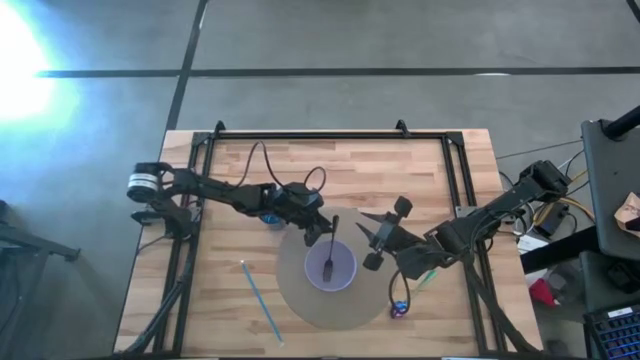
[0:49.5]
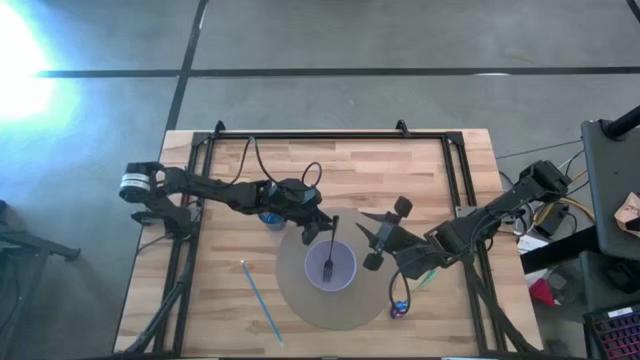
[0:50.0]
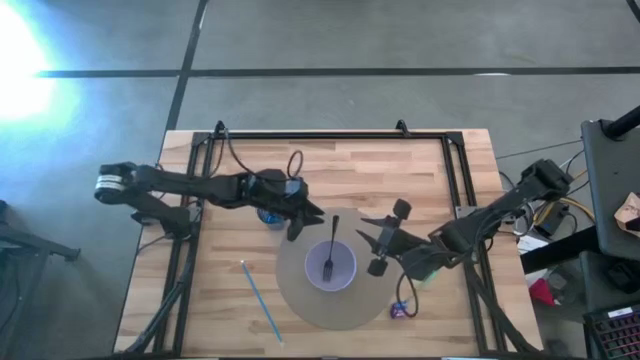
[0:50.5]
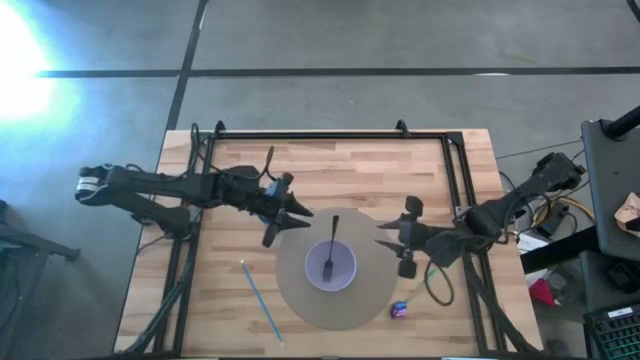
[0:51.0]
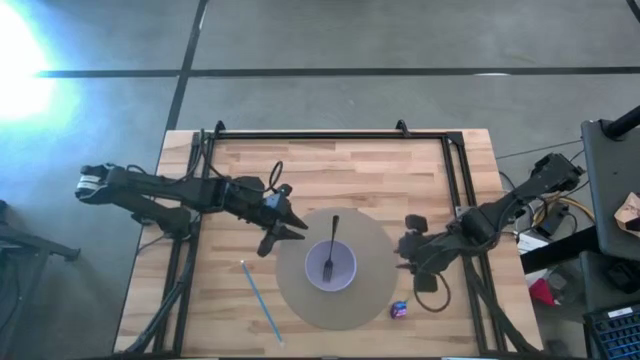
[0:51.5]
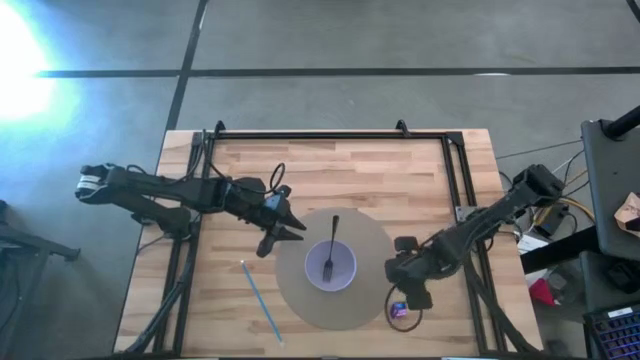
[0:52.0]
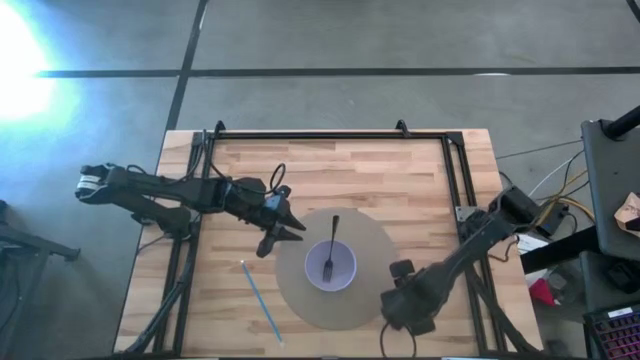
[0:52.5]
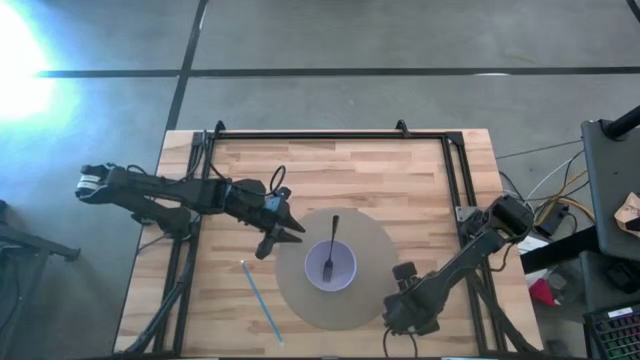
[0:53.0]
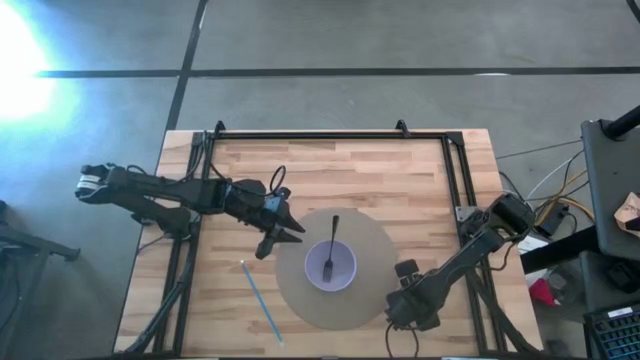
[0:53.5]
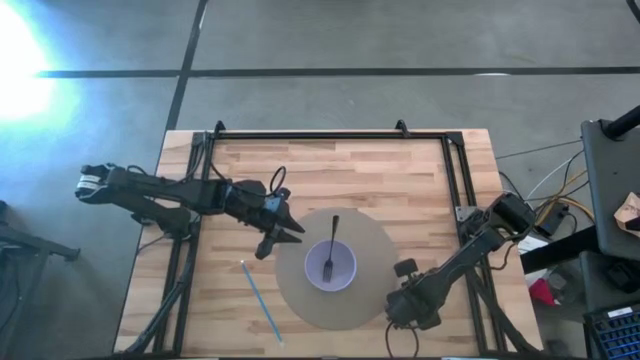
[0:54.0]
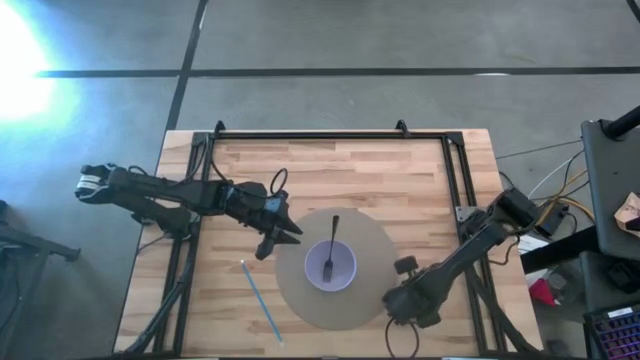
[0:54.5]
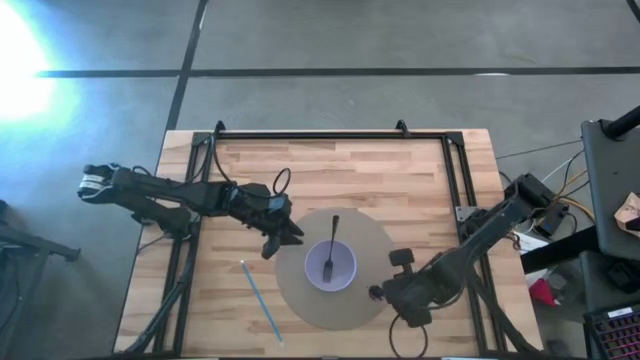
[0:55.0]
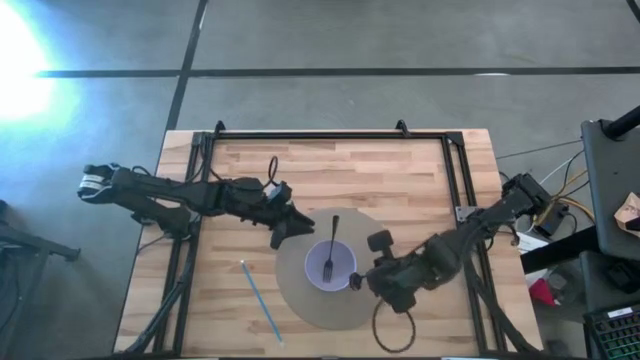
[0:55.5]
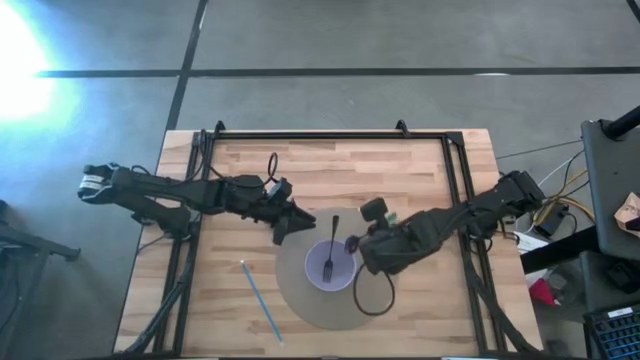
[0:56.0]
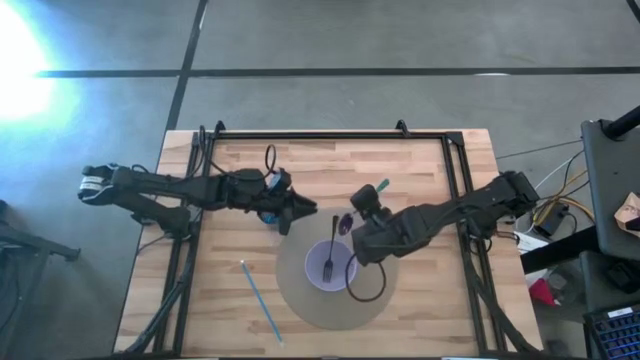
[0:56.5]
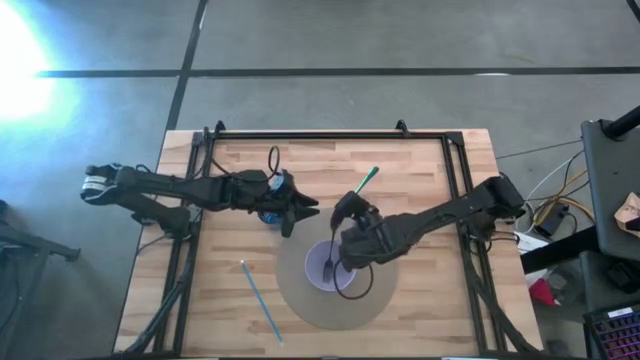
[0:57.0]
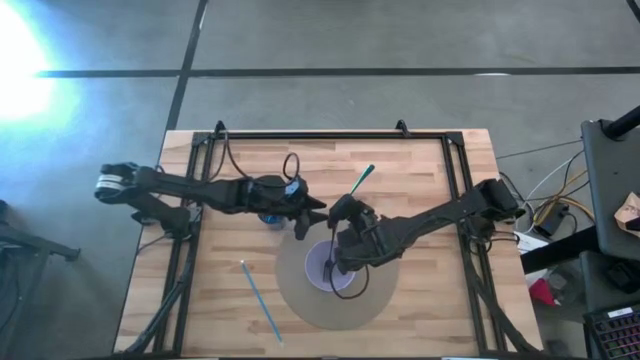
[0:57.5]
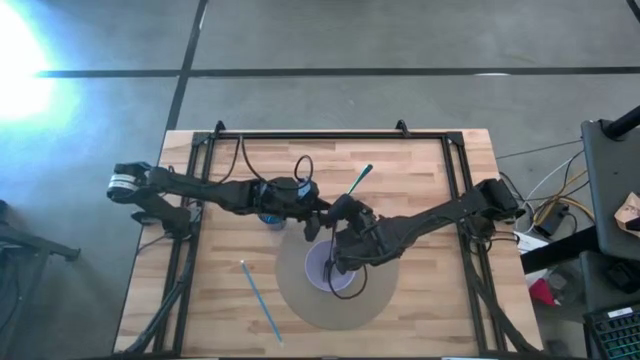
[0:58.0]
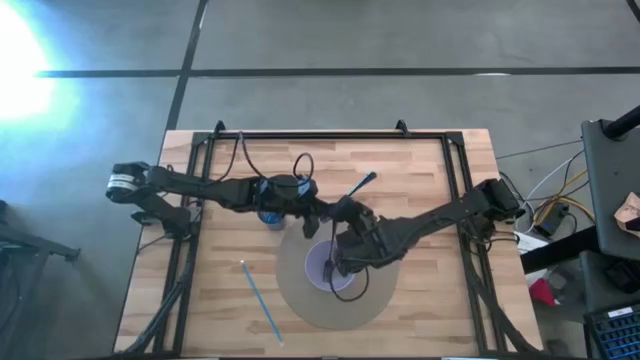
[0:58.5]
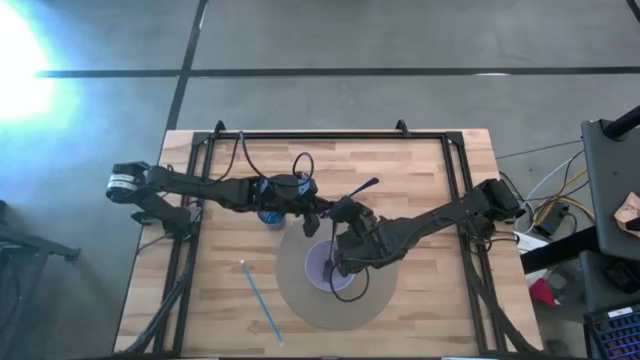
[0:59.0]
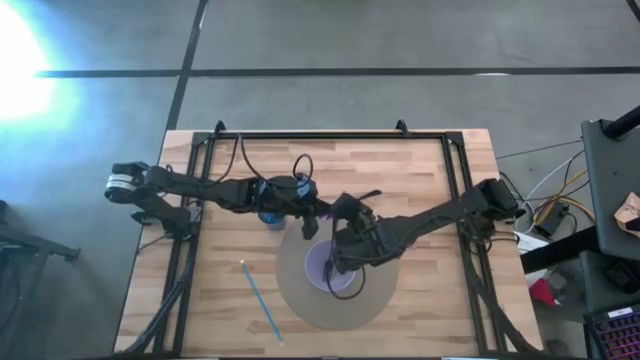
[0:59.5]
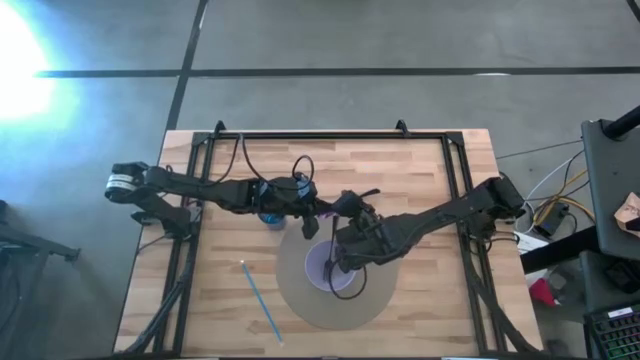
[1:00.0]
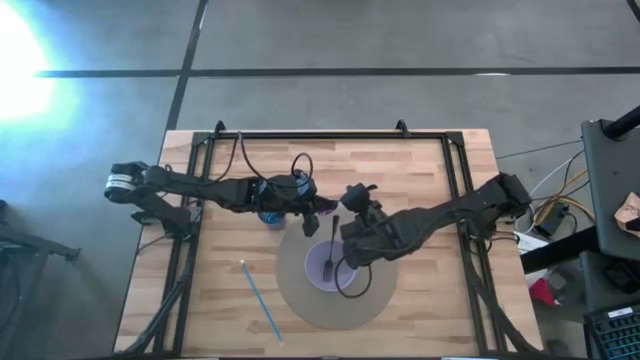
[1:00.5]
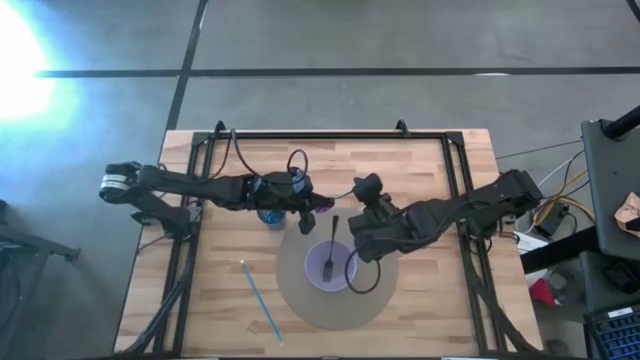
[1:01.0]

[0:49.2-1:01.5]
Task: Pick & Place Utensil
Put the blue spoon into the violet bowl

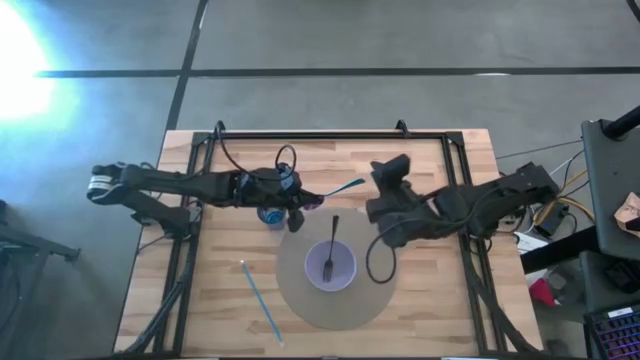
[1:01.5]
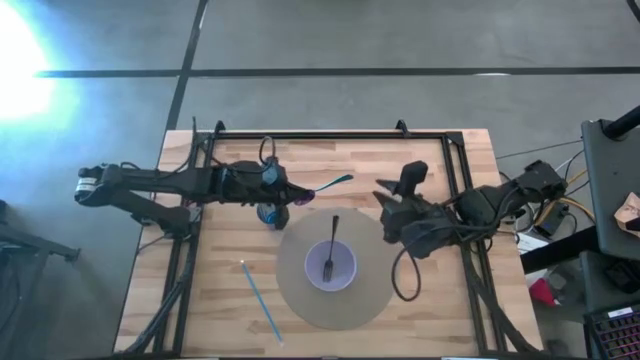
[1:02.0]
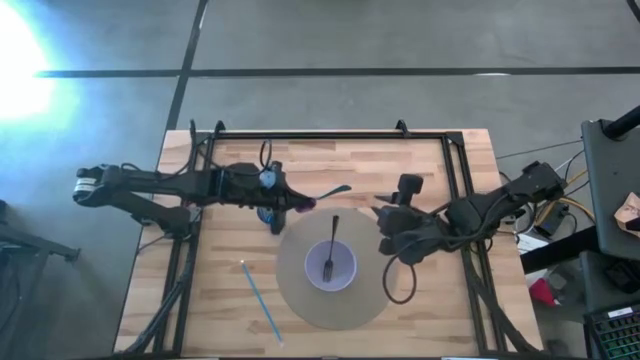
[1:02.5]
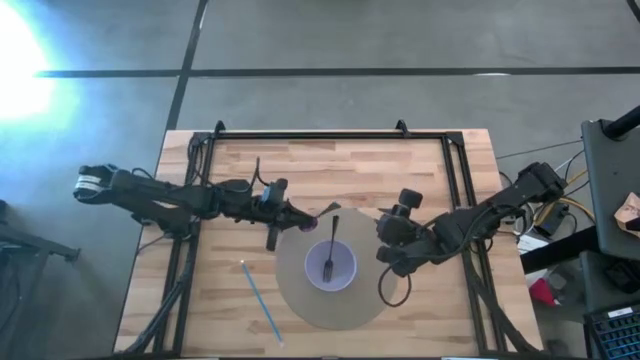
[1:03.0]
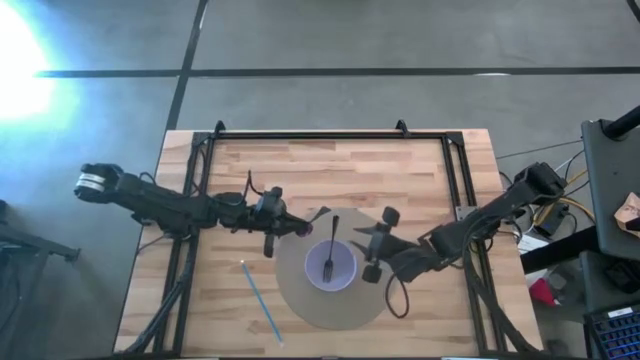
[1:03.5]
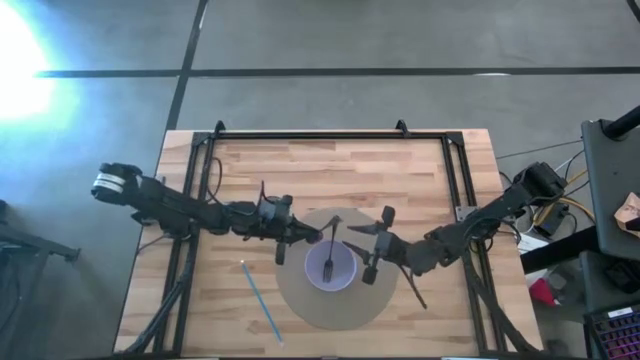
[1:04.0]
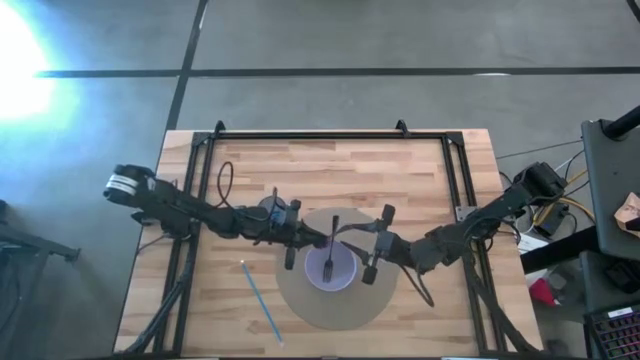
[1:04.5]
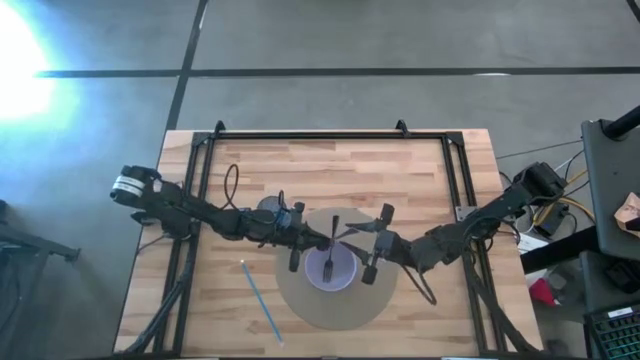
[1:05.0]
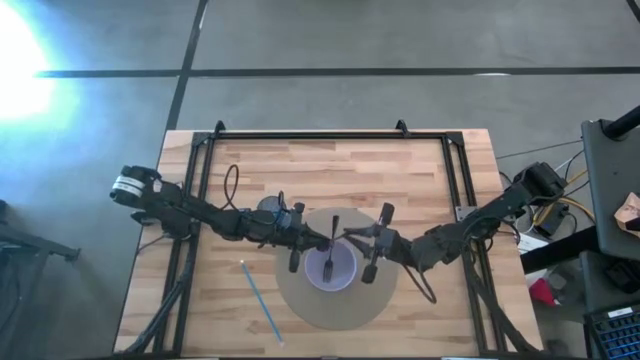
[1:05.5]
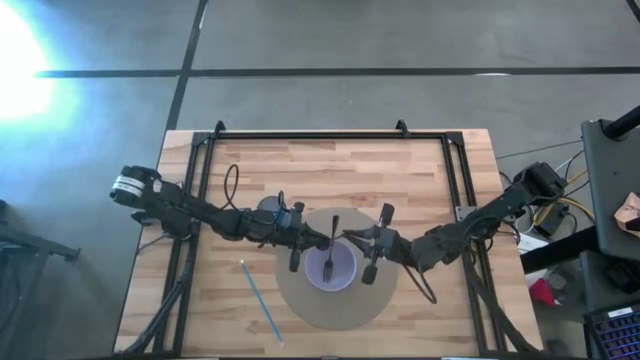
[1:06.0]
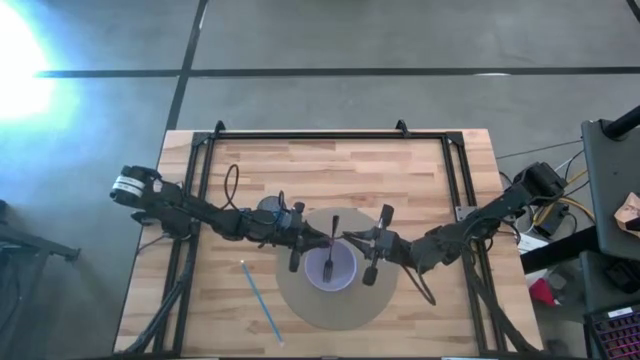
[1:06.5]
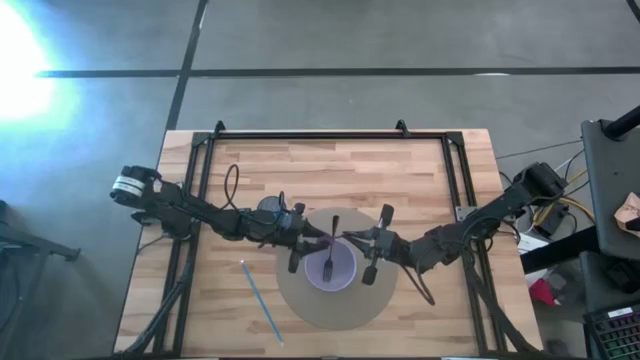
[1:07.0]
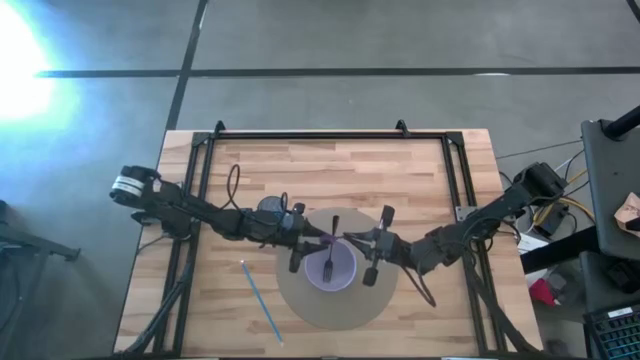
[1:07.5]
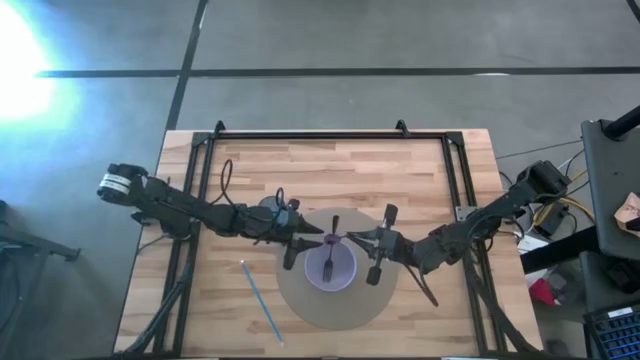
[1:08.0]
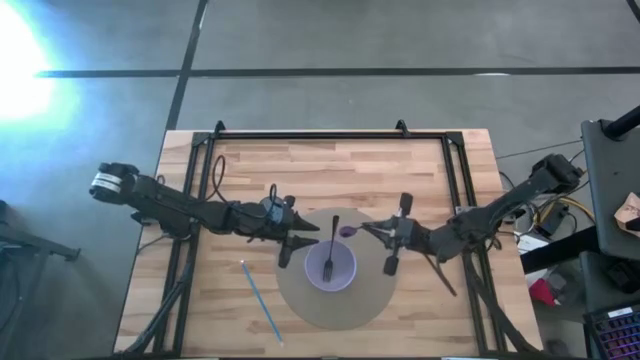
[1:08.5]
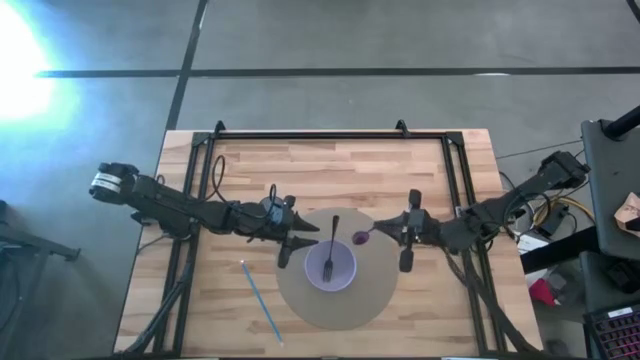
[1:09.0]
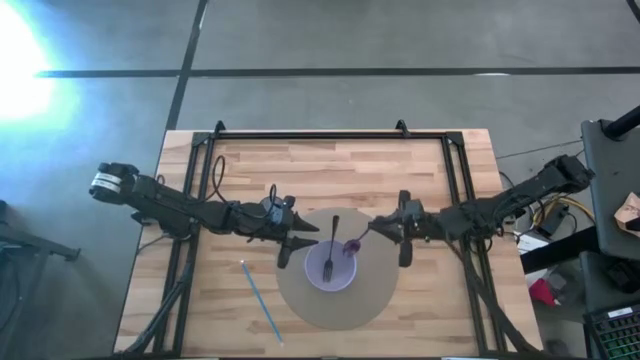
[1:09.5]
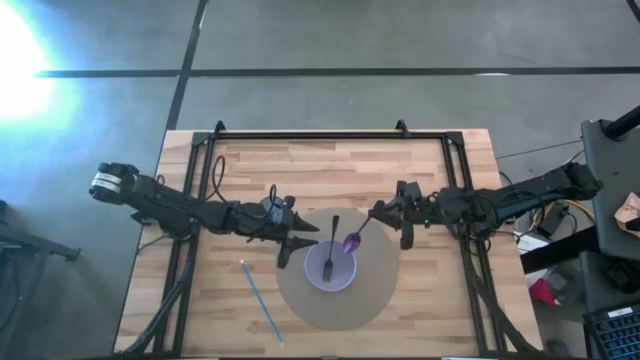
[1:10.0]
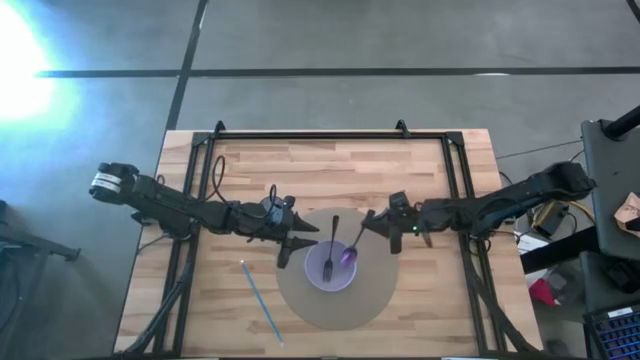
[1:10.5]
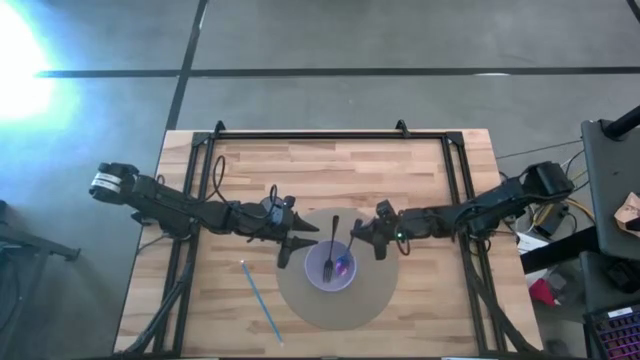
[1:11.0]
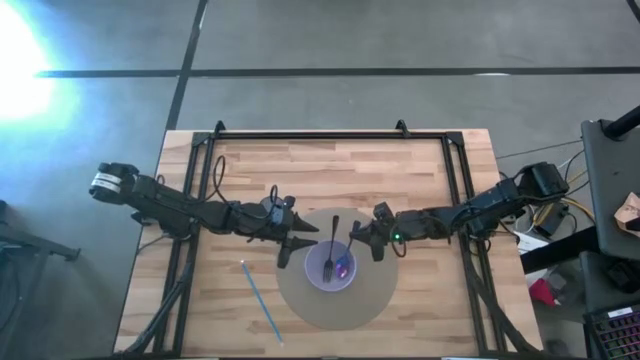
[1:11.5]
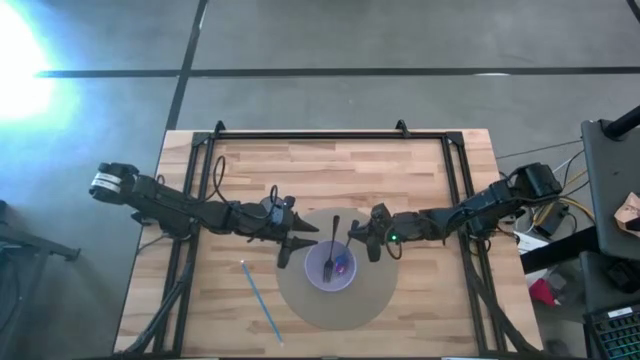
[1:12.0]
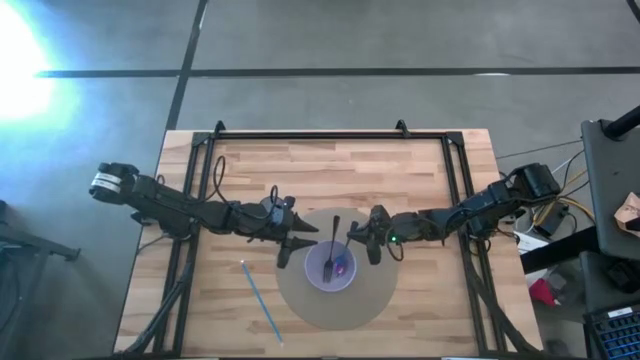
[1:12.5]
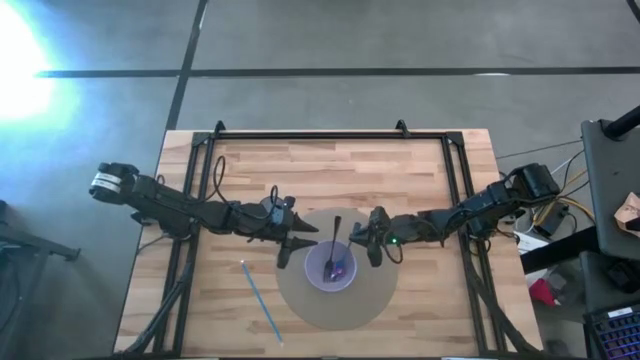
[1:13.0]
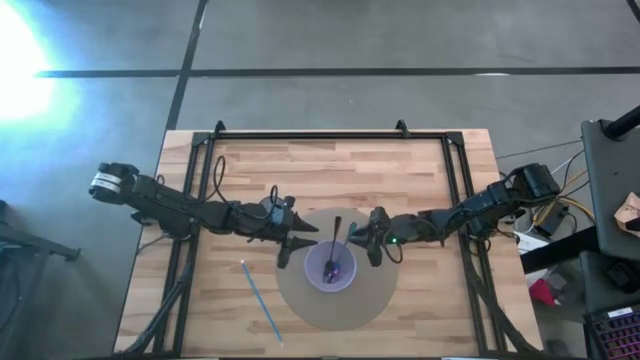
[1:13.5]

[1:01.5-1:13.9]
Put the blue spoon into the violet bowl
